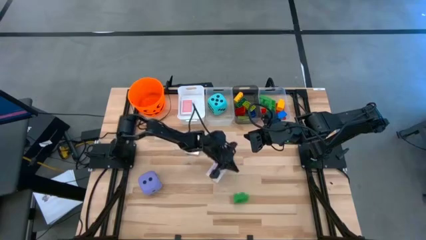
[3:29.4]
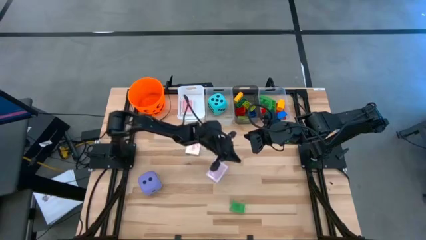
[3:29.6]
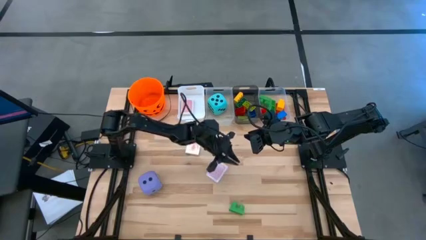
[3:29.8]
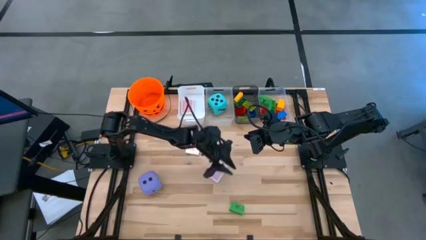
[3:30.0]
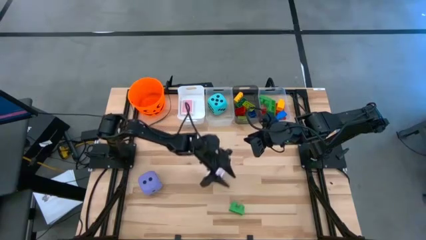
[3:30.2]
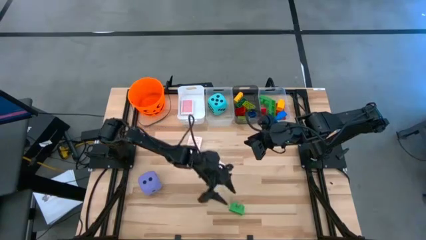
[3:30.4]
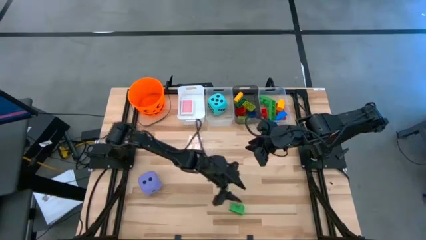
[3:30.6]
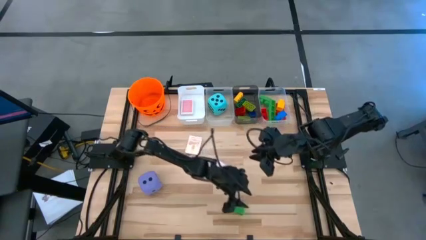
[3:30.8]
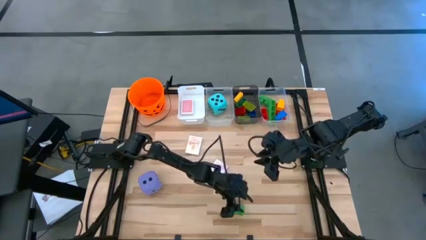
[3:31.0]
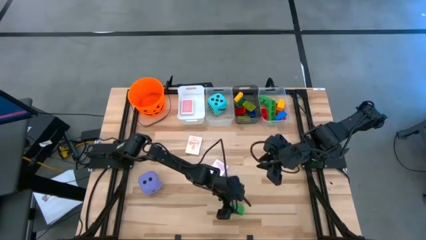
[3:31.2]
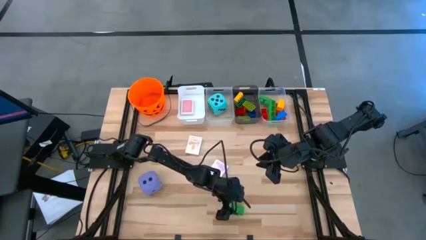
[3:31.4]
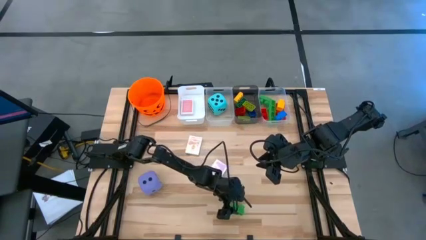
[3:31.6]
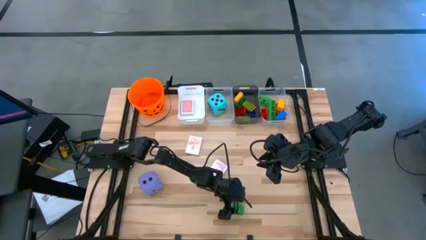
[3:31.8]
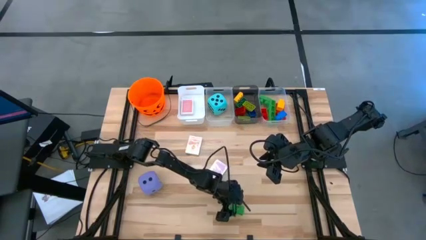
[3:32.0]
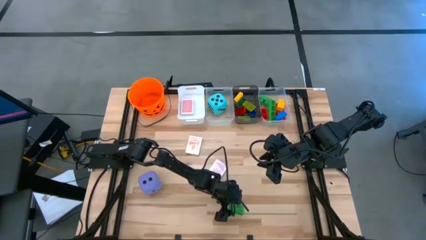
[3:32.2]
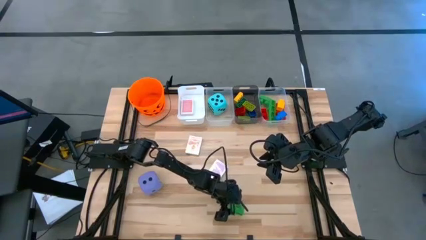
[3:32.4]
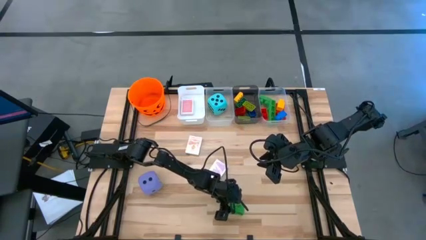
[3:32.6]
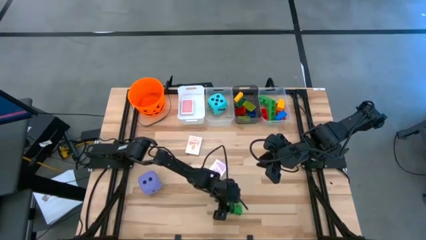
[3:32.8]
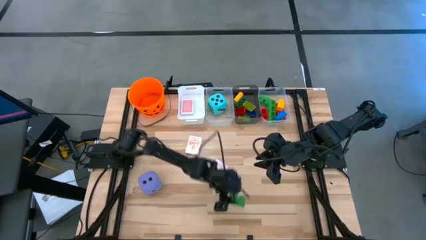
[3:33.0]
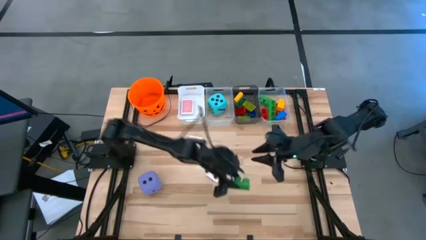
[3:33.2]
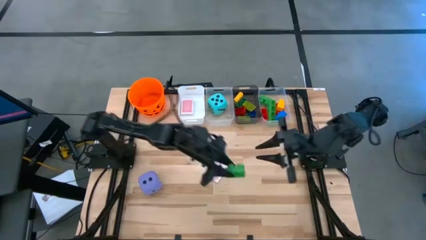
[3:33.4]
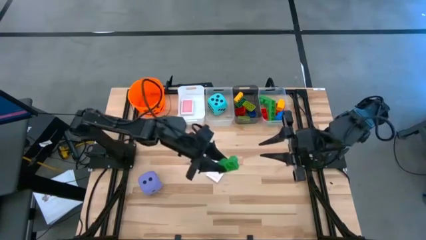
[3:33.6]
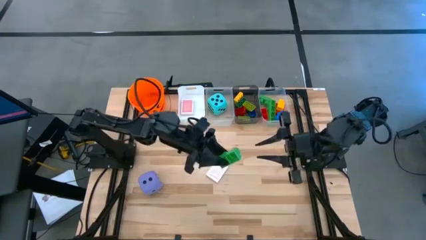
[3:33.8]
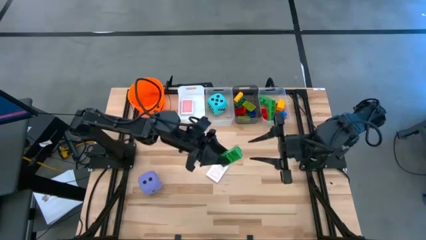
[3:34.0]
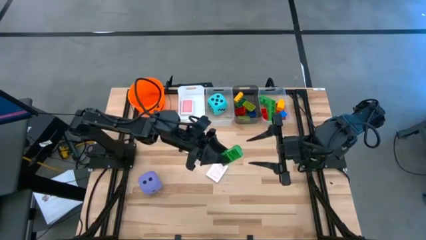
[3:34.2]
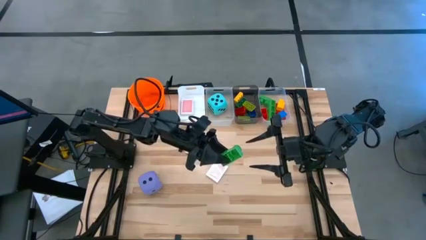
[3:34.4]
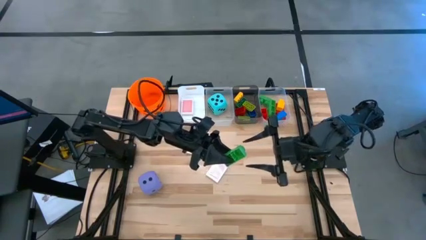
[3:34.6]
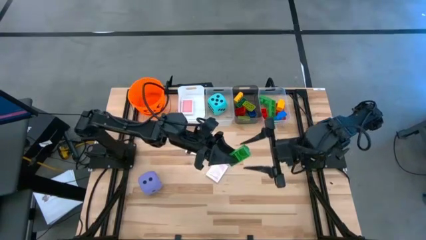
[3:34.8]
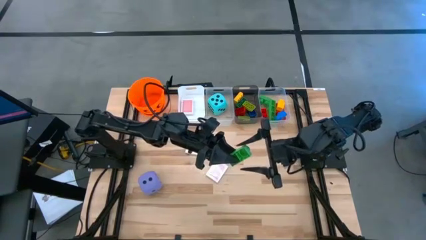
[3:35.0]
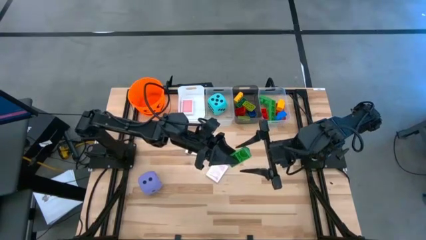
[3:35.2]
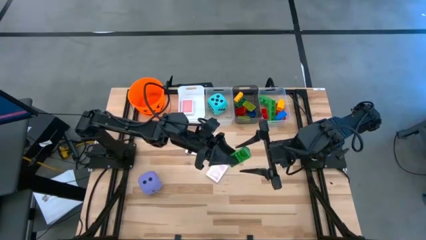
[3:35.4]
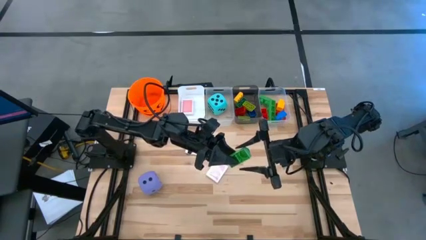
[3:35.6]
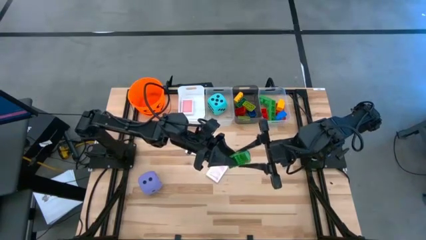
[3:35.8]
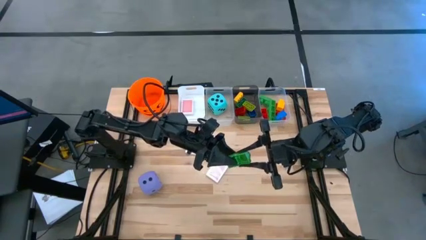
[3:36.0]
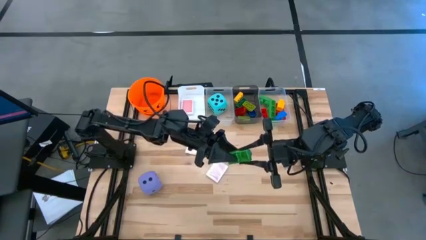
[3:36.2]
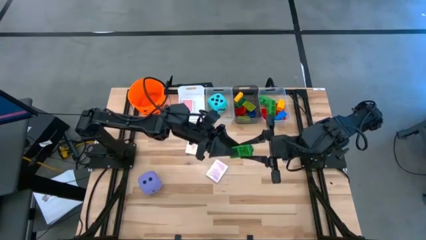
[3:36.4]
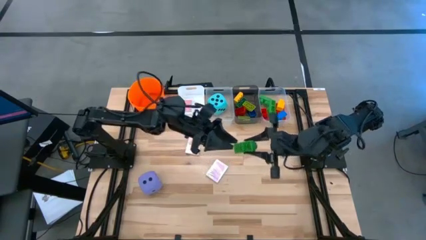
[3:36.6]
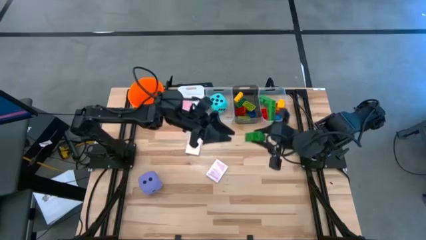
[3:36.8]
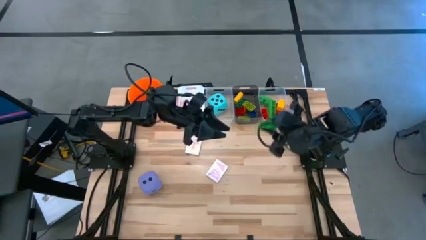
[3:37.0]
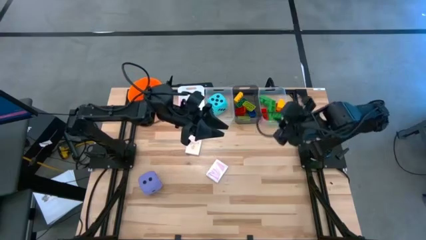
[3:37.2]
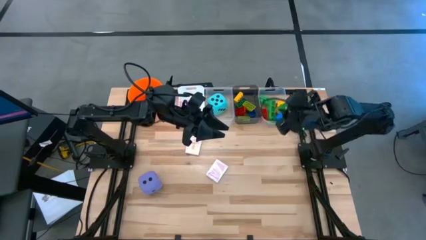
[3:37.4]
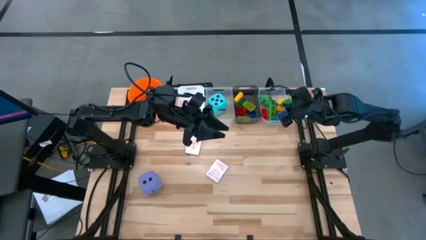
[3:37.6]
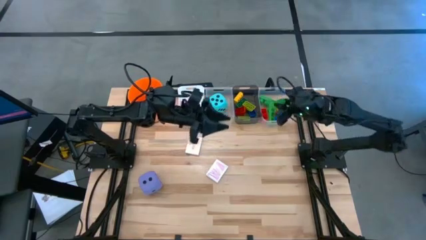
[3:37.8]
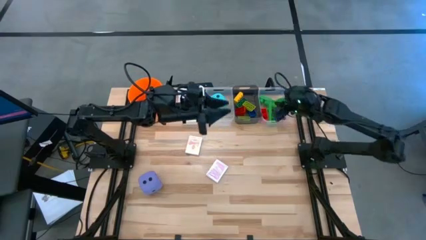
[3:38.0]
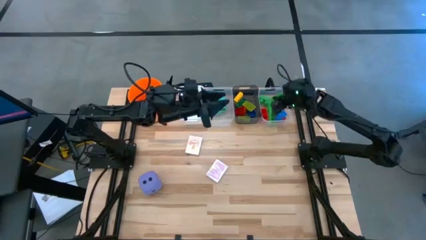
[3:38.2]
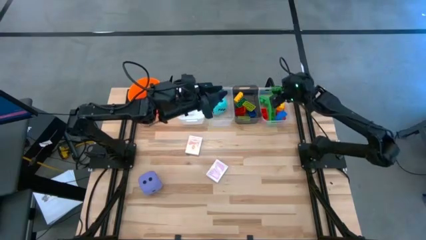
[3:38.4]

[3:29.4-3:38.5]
Task: Pick & Place Toys
Put the large green game piece into the right transparent bin

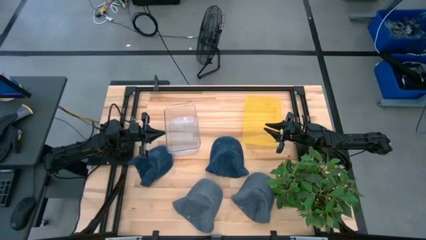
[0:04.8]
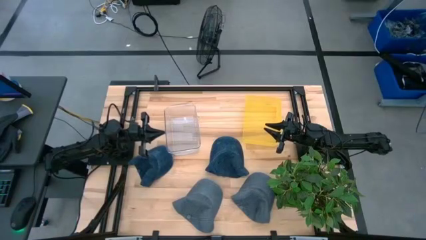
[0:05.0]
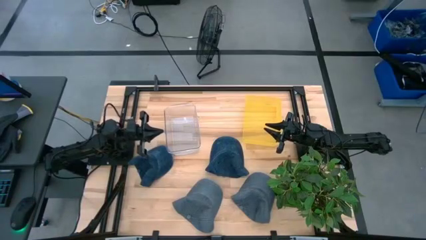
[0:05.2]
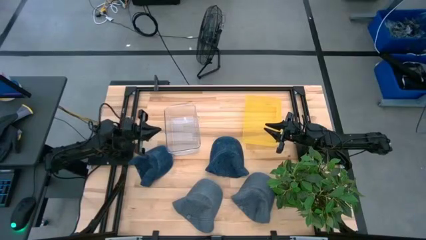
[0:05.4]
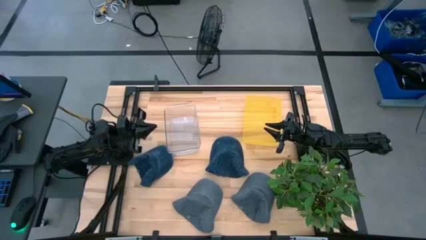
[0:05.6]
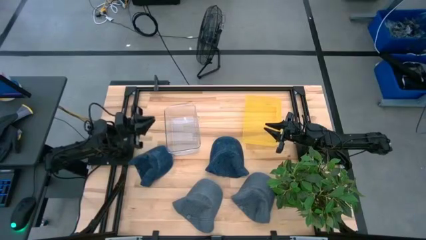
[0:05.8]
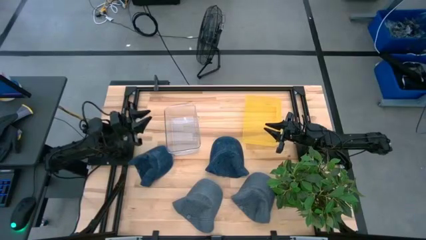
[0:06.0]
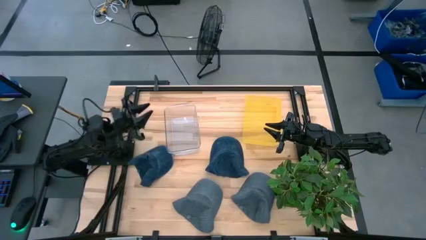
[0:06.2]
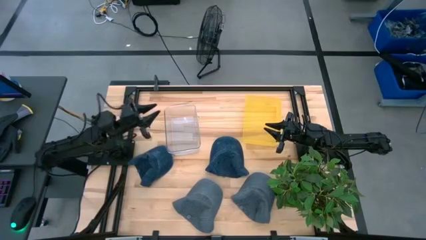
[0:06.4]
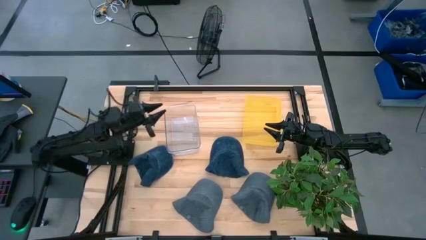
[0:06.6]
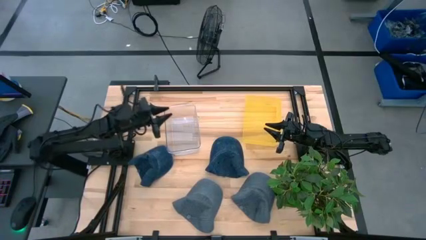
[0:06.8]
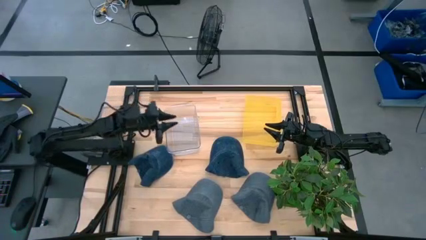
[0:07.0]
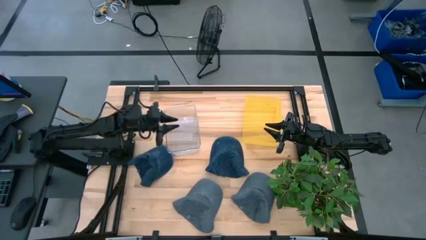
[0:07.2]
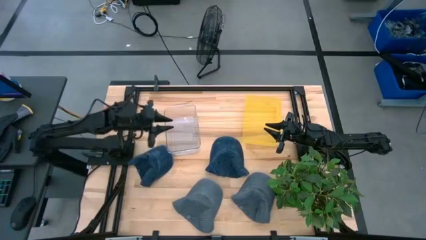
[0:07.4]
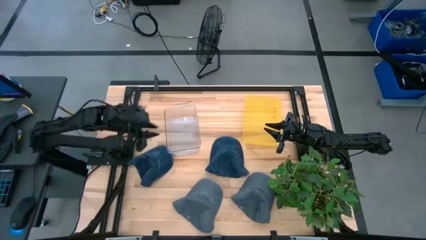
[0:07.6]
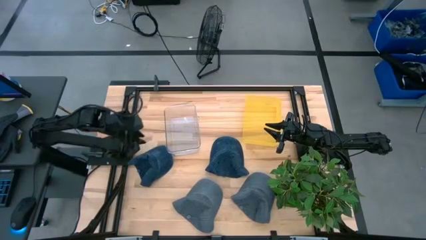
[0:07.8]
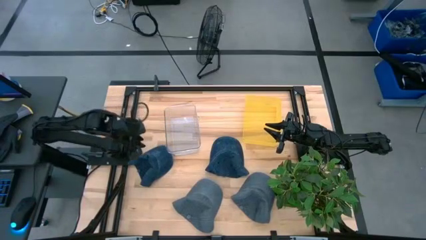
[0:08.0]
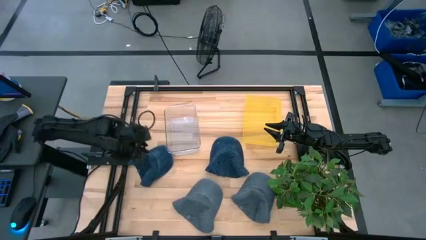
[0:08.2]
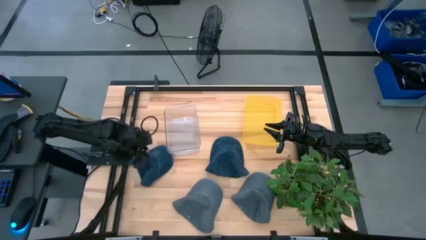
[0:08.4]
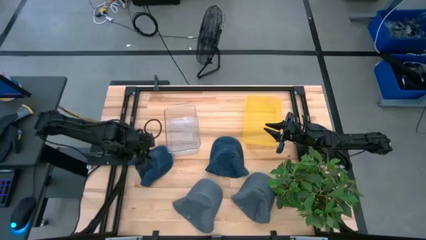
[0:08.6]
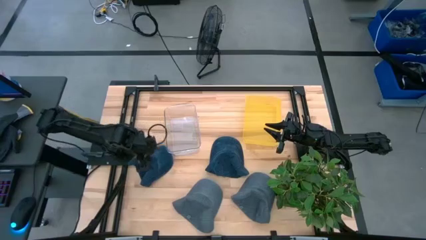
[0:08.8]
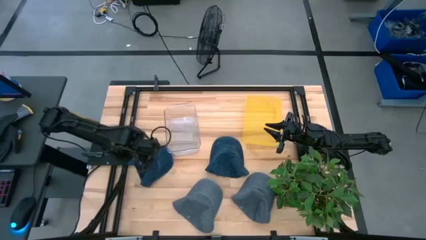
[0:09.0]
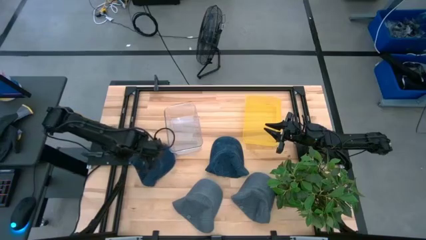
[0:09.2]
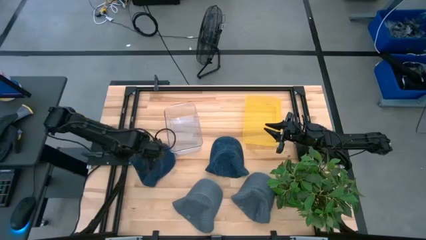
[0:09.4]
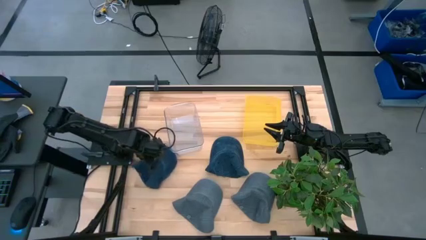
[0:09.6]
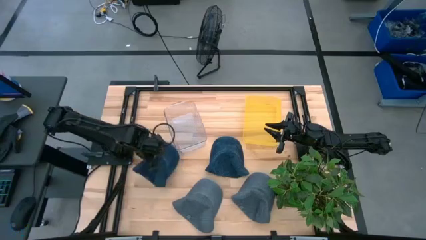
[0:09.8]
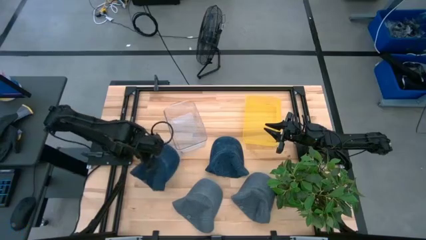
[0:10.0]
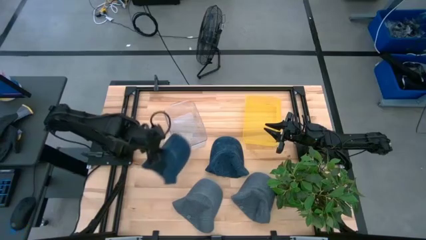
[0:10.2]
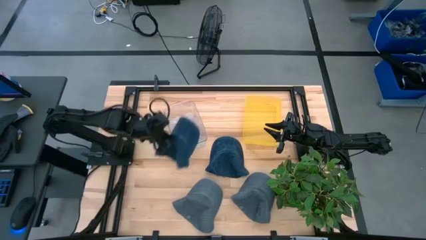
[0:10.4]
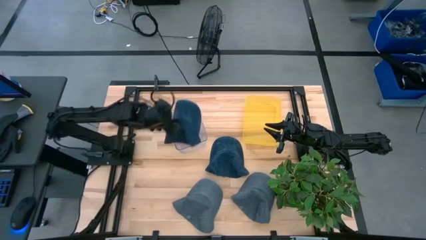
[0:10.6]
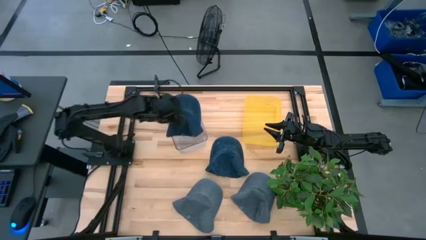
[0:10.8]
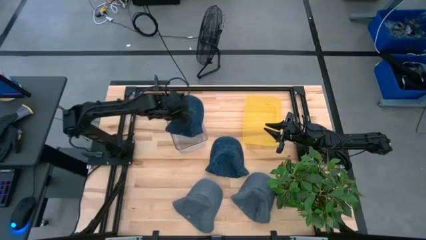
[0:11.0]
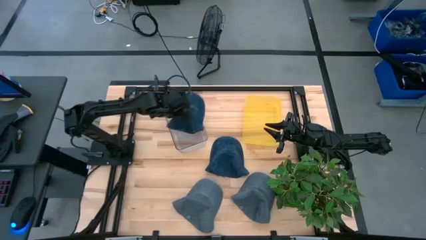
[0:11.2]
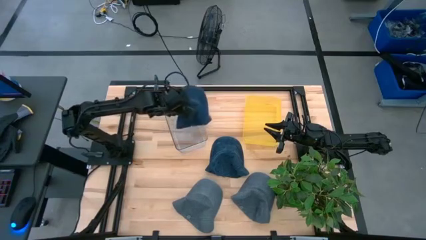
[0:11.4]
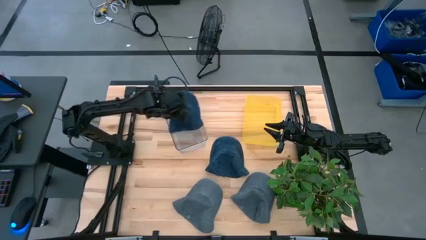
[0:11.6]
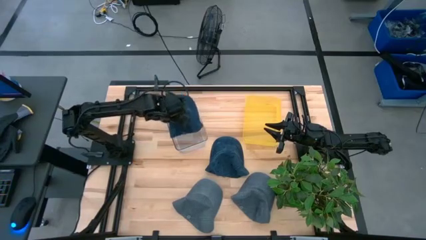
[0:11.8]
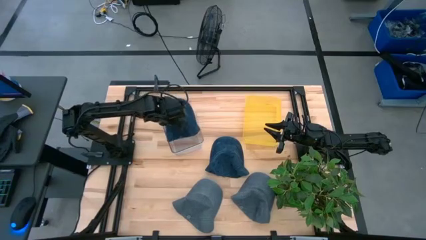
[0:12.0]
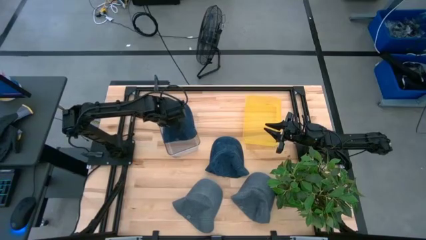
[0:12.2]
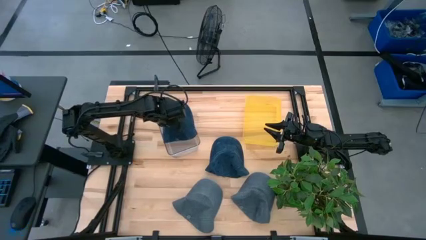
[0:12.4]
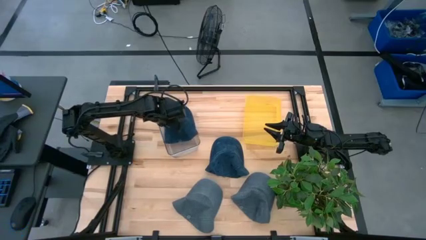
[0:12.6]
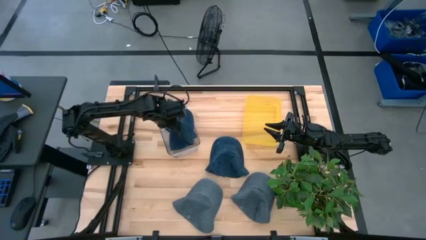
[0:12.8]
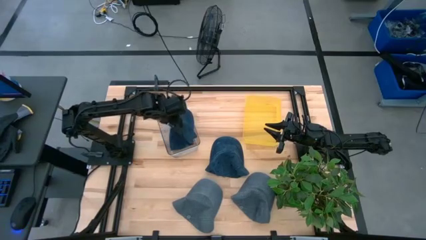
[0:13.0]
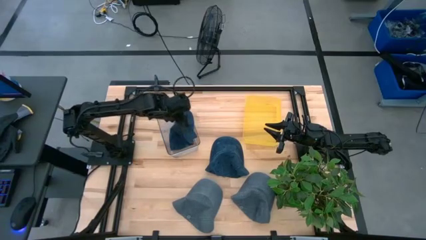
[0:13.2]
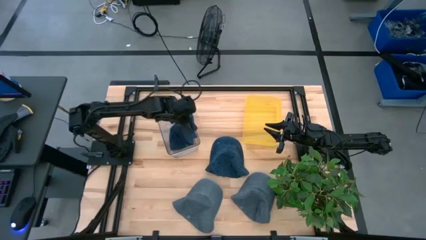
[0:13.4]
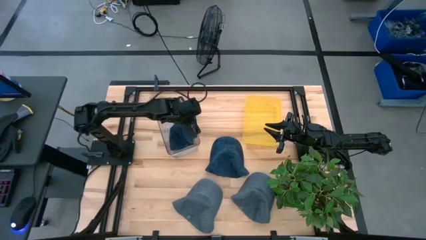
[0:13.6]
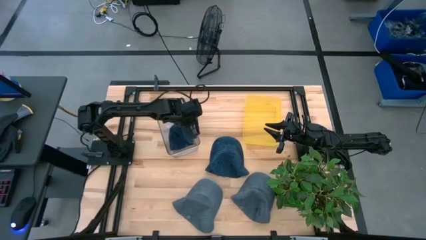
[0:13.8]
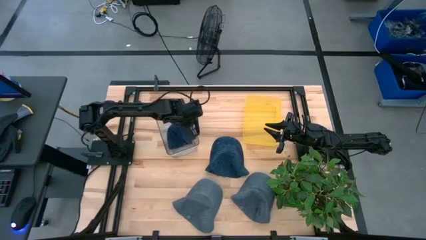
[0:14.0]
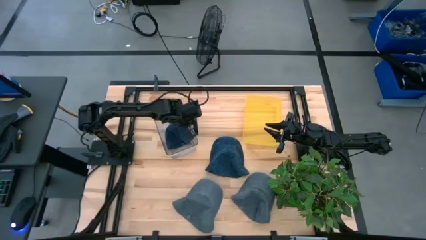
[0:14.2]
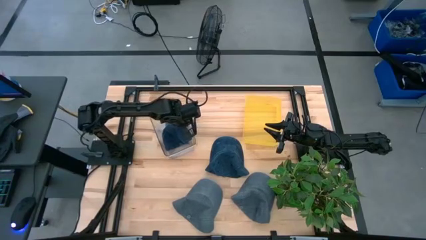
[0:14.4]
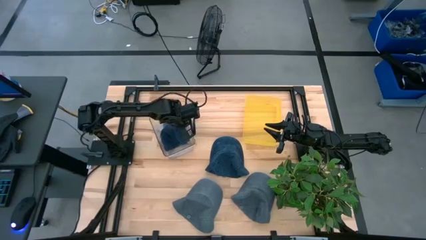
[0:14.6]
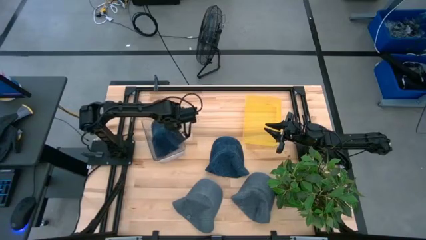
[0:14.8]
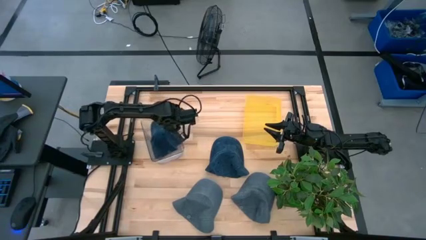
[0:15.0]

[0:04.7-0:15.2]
Task: Pick & Place hat
Put the left blue cap into the transparent bin
